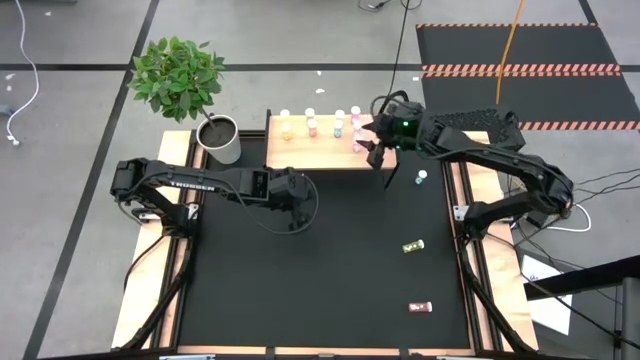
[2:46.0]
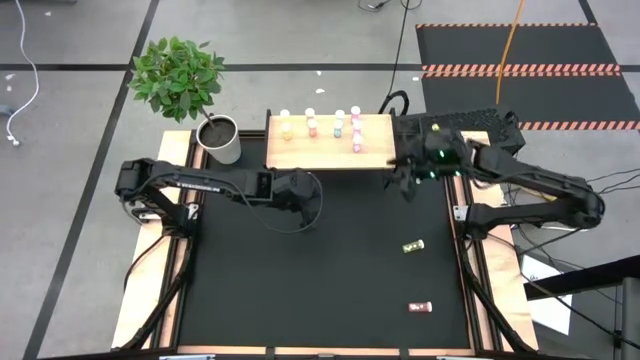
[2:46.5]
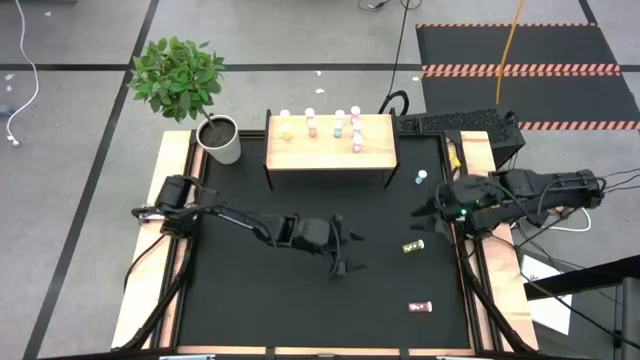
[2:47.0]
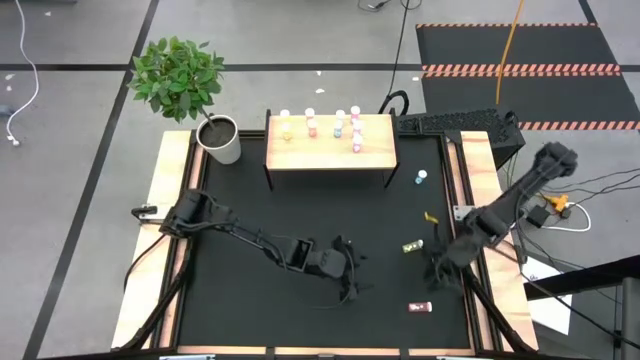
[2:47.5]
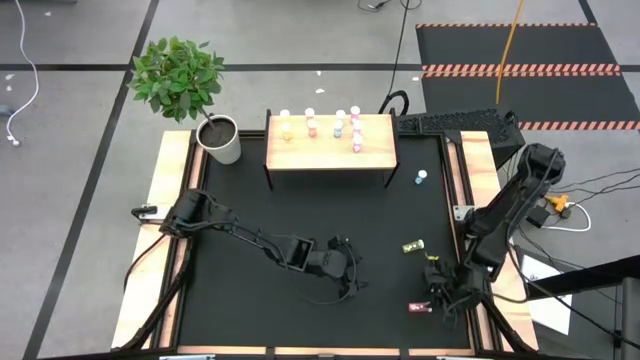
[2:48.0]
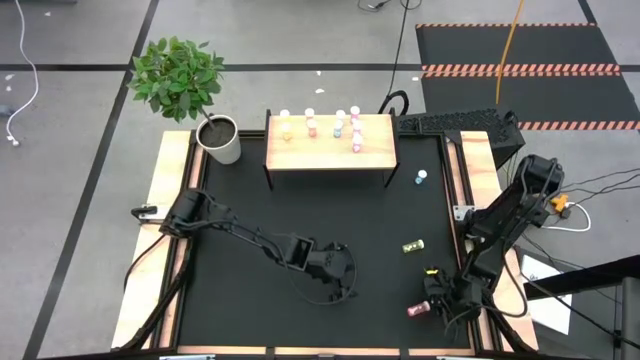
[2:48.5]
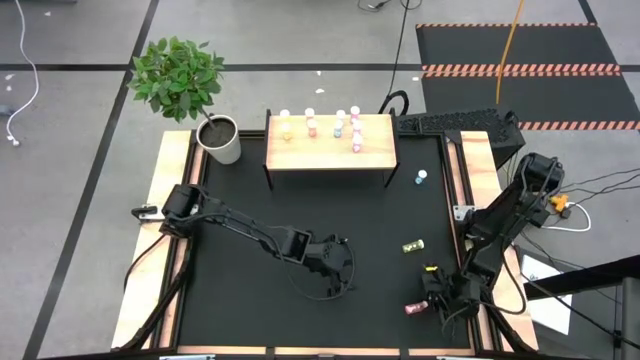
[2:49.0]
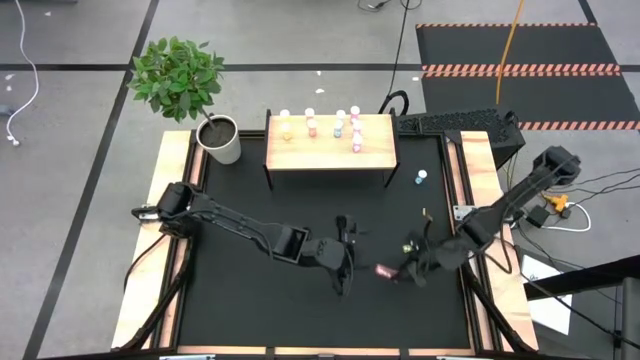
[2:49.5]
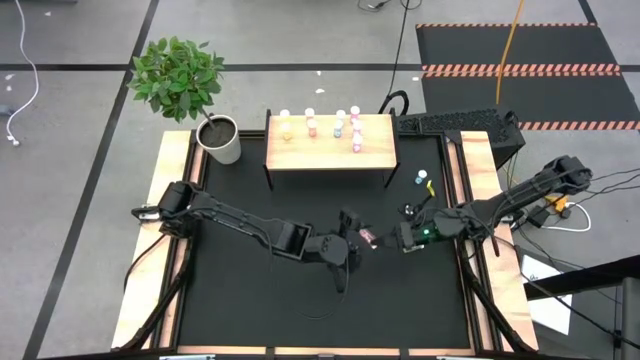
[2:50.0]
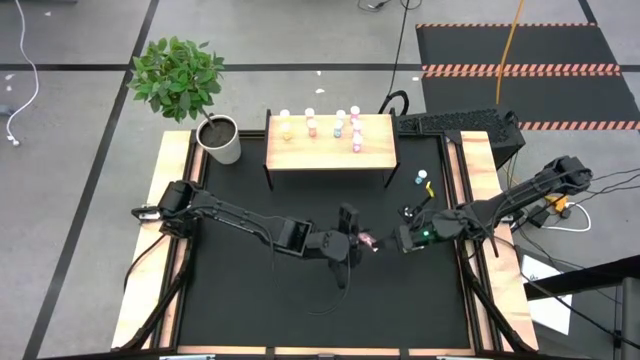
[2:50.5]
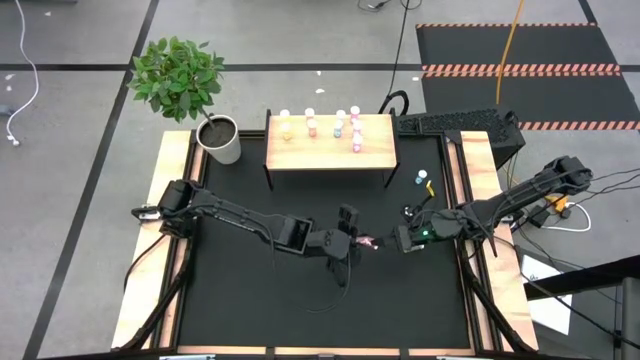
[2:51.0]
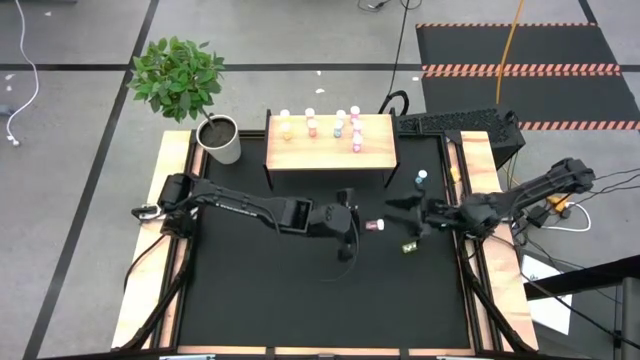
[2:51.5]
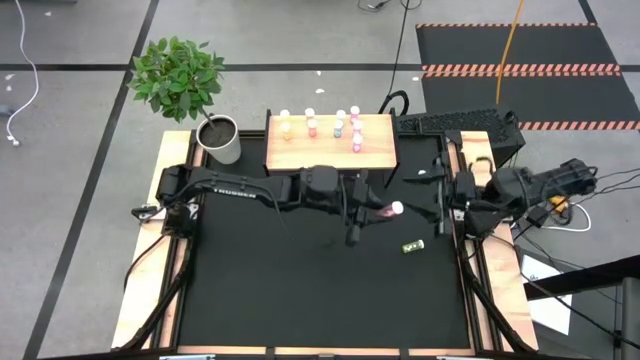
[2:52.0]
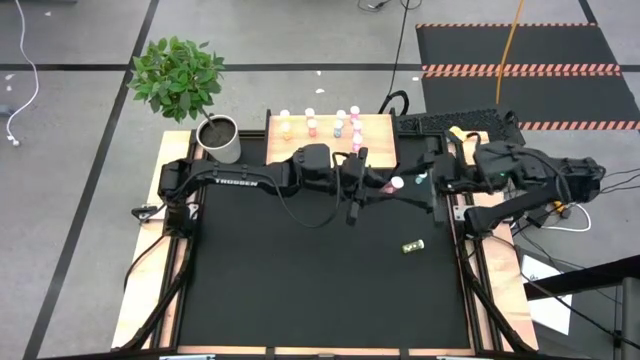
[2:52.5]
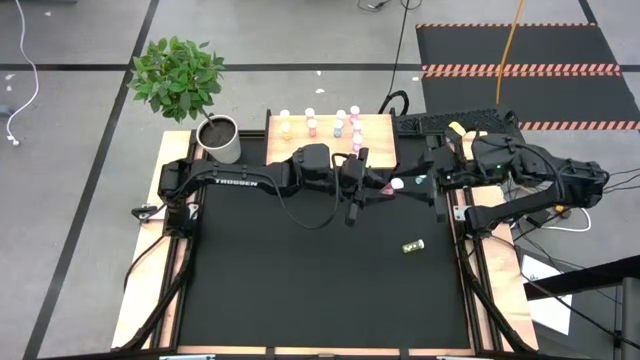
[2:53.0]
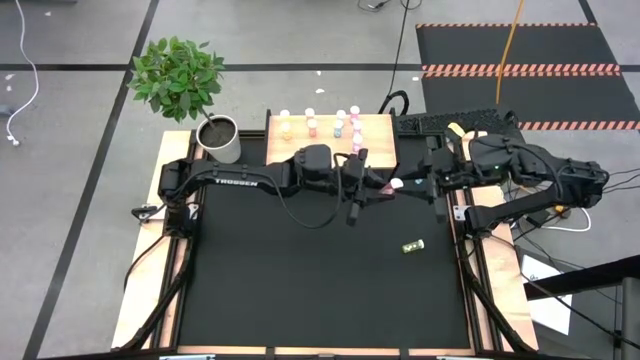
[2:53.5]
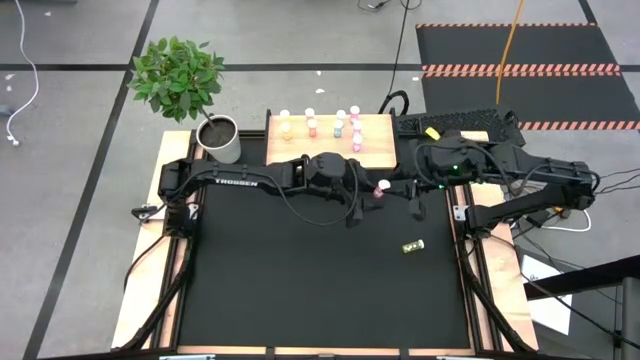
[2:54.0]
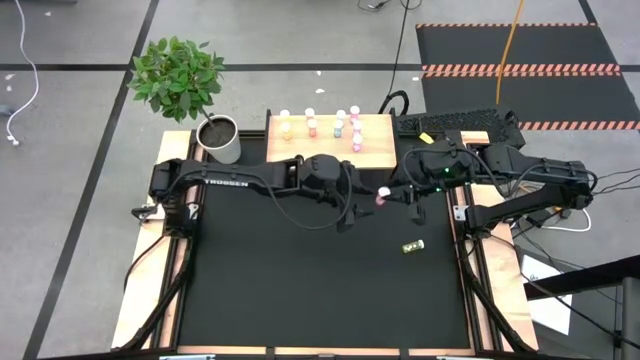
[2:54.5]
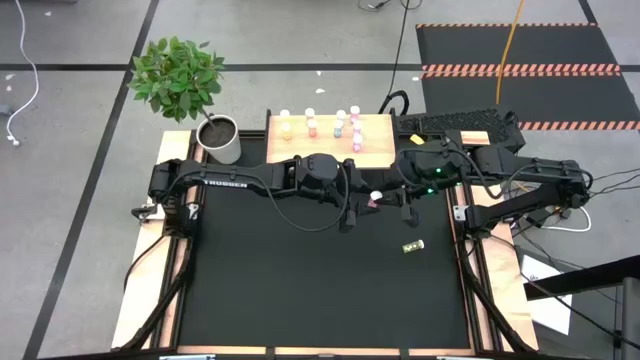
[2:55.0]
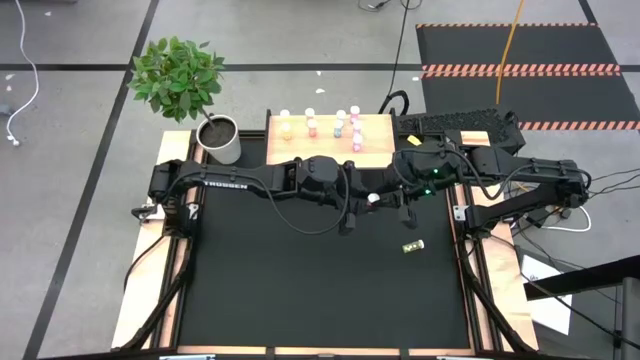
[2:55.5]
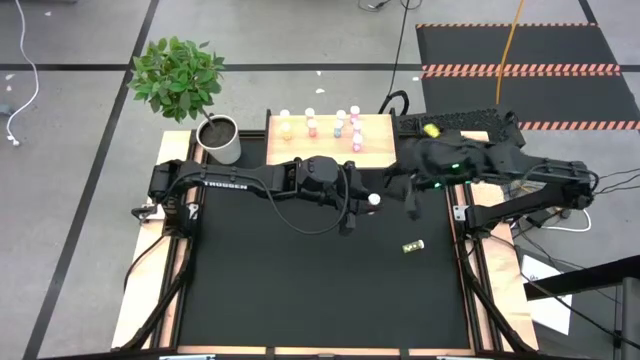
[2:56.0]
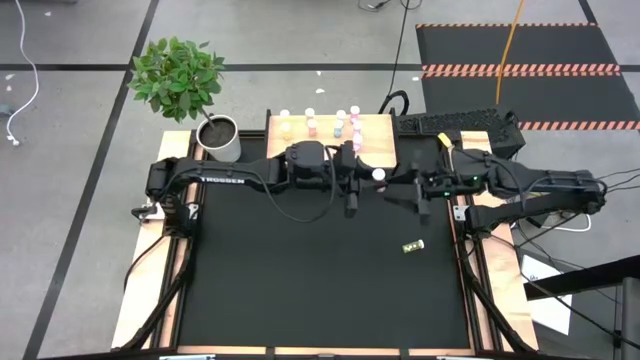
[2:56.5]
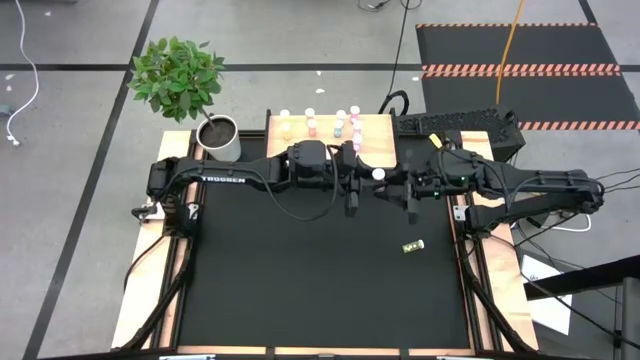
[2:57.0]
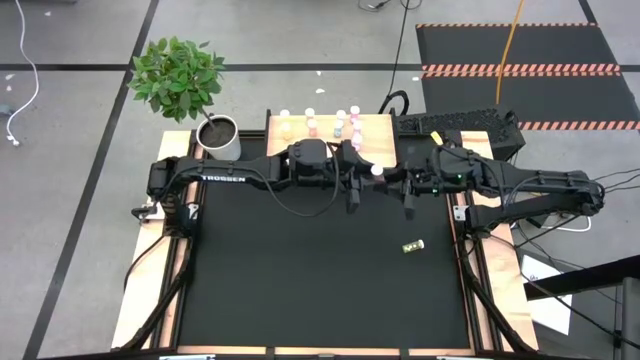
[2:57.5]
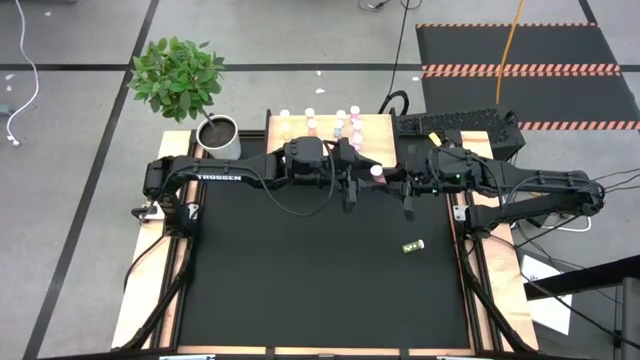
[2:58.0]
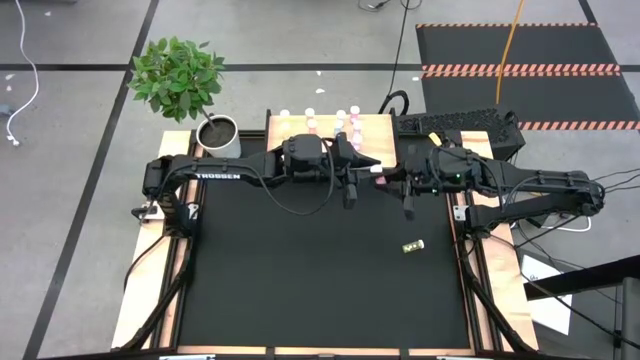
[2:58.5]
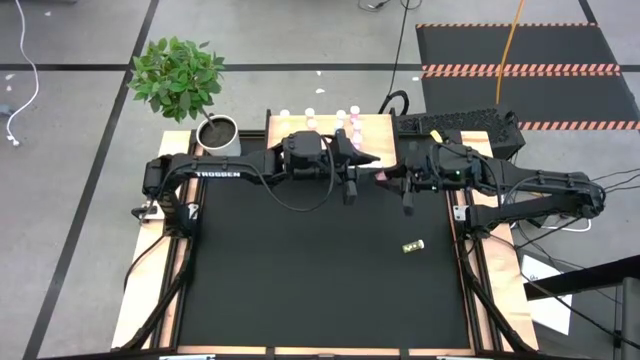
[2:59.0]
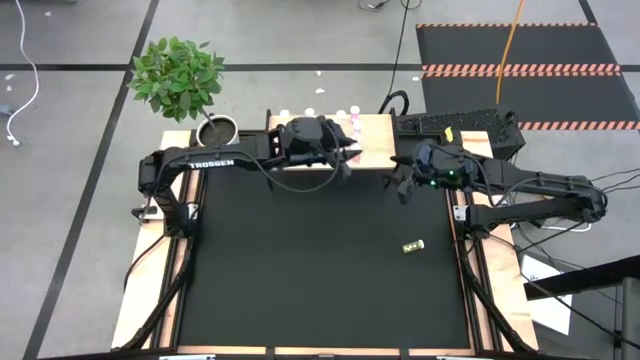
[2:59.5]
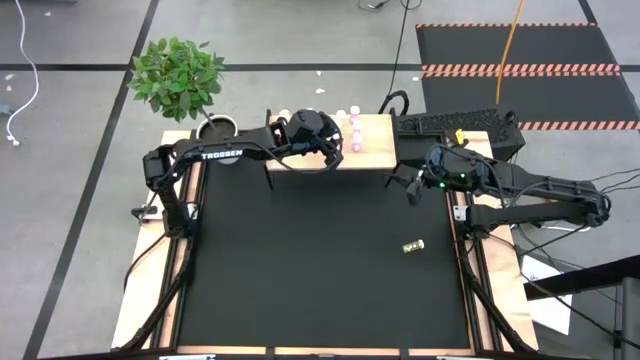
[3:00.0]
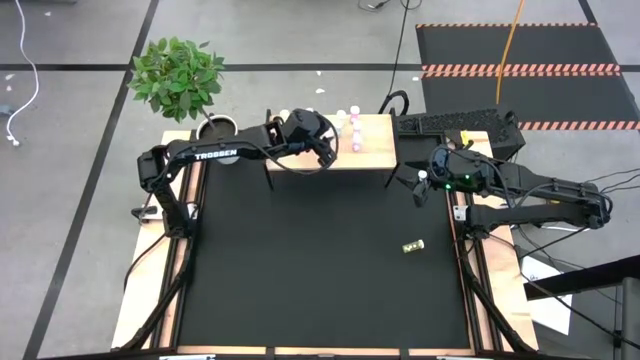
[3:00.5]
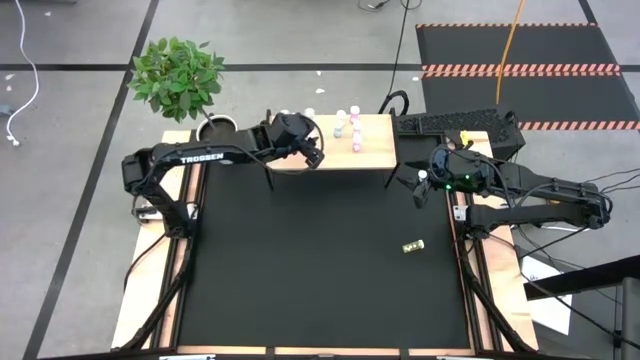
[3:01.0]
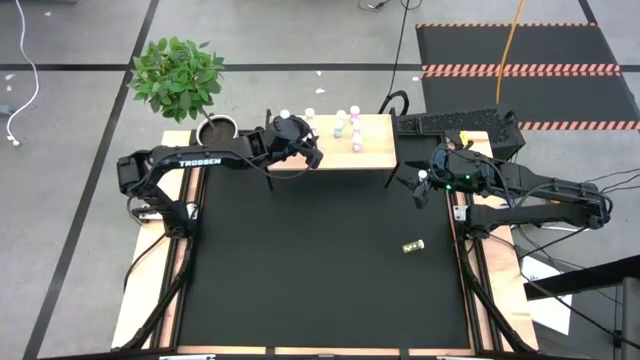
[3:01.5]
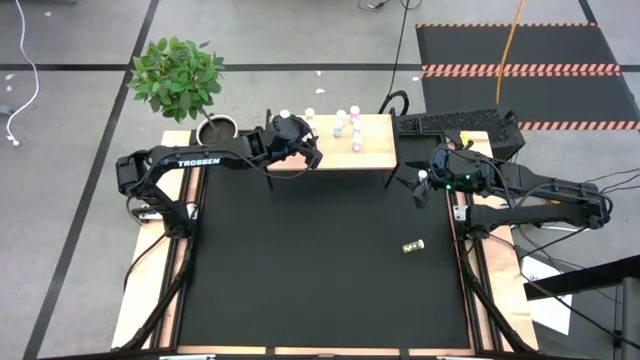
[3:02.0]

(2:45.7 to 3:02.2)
Task: Pick and place medicine bottles onto shelf by color
Put the orange pill bottle on the shelf aligned with the other orange pill bottles

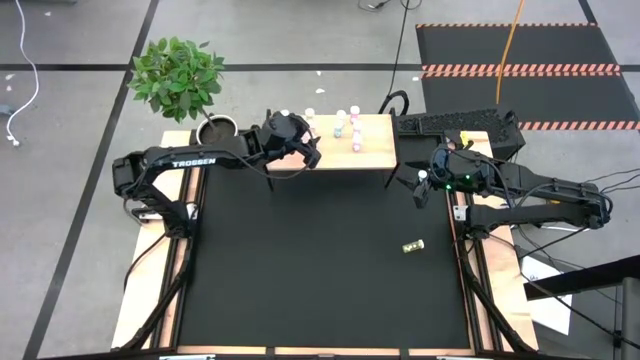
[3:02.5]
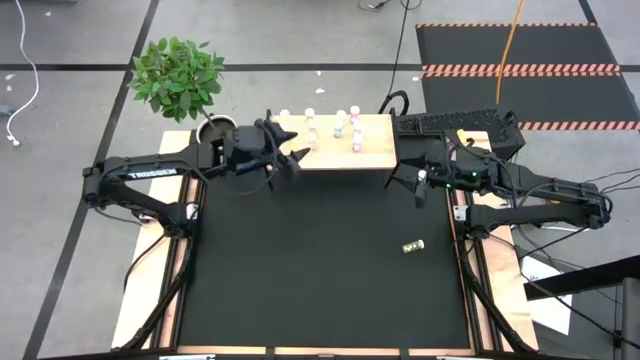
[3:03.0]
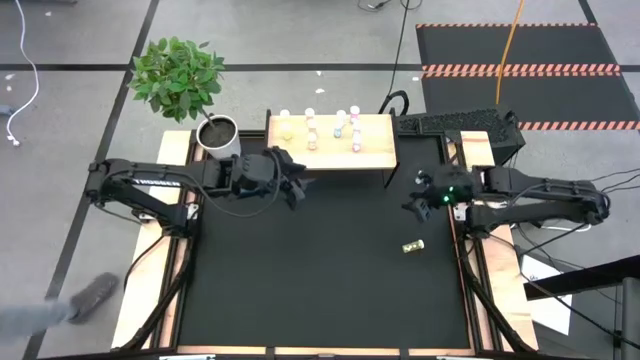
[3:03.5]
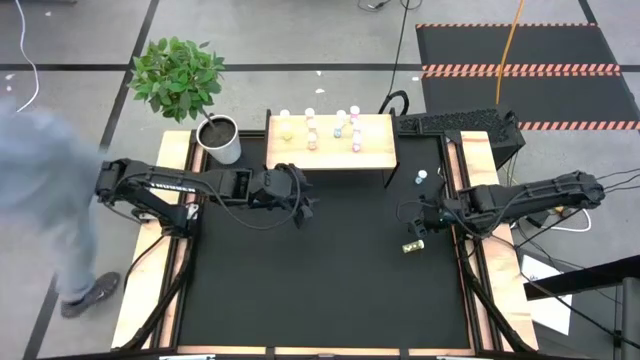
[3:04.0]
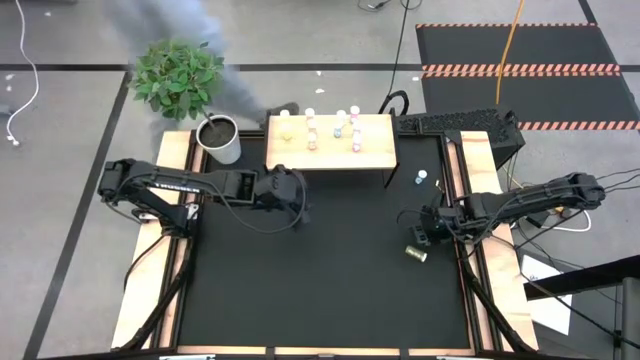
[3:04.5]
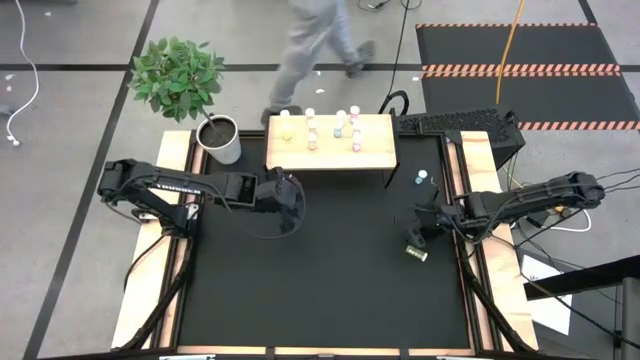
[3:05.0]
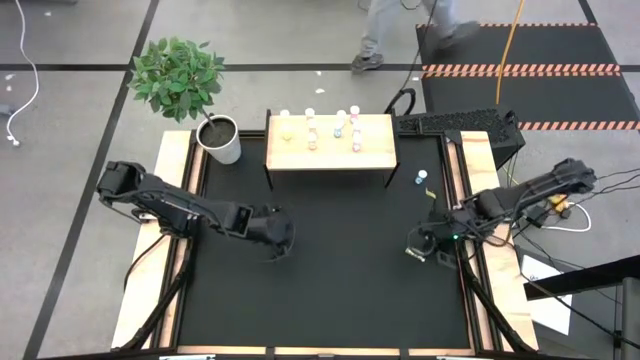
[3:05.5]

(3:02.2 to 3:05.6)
Put the yellow pill bottle on the shelf aligned with the other yellow pill bottles

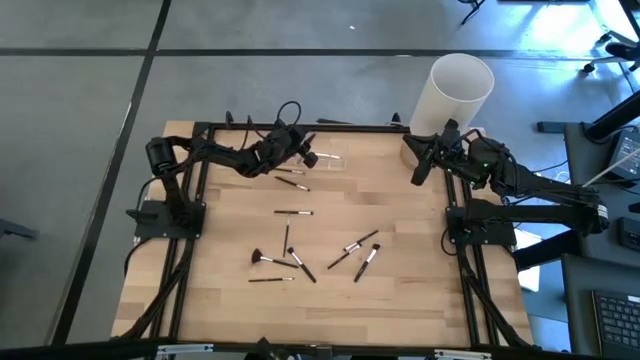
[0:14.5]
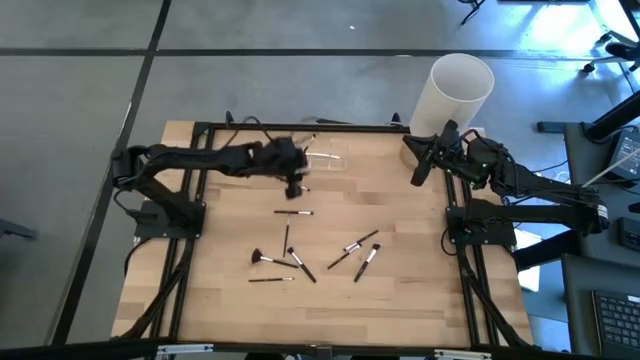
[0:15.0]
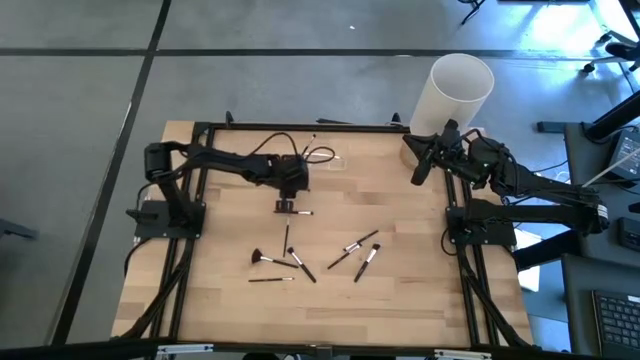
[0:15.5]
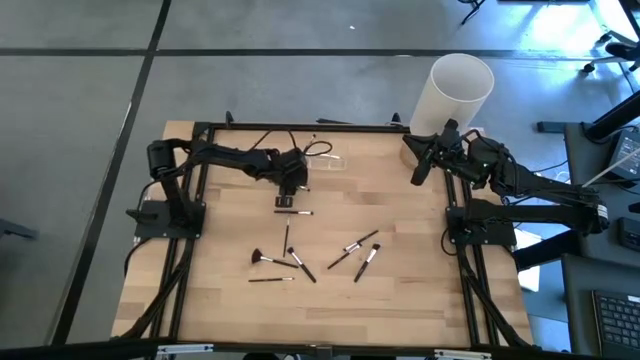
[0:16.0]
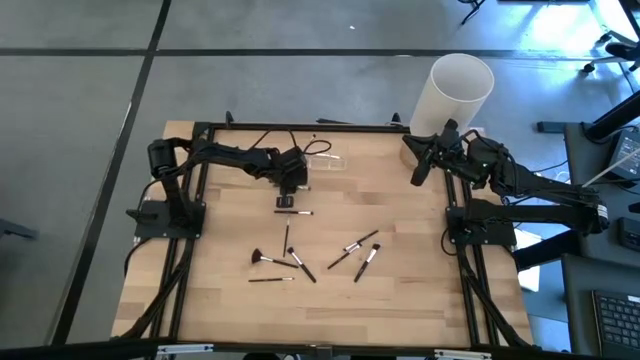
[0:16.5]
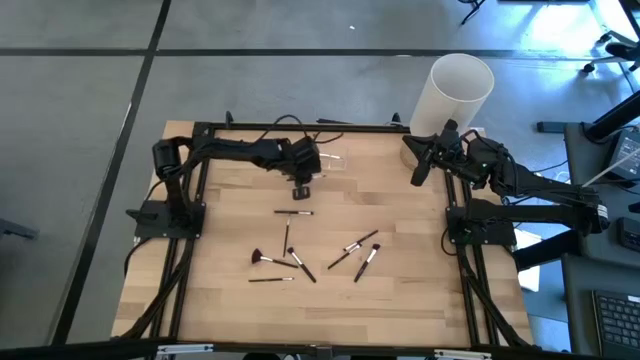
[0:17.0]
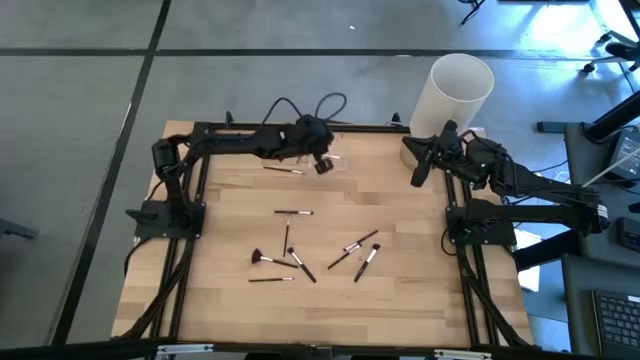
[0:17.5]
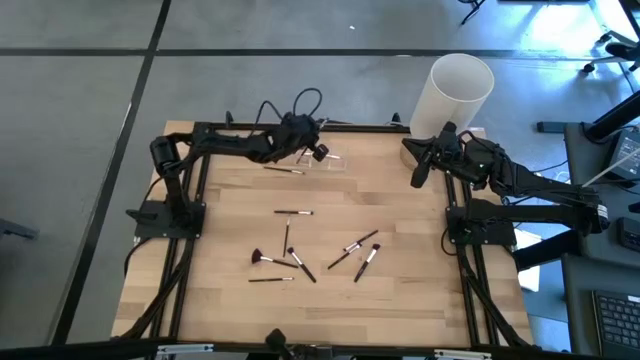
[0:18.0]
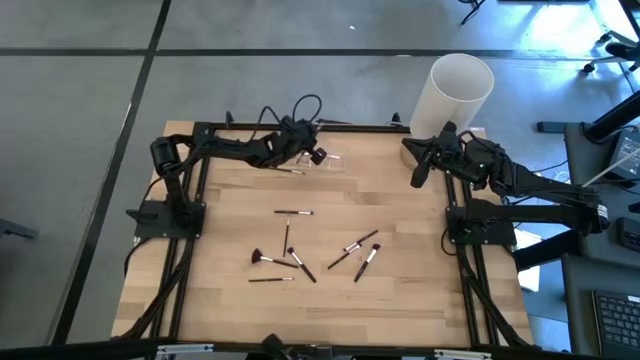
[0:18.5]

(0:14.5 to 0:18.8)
Task: Pick & Place Makeup Brushes
Put the eyeshadow brush into the transparent organizer
